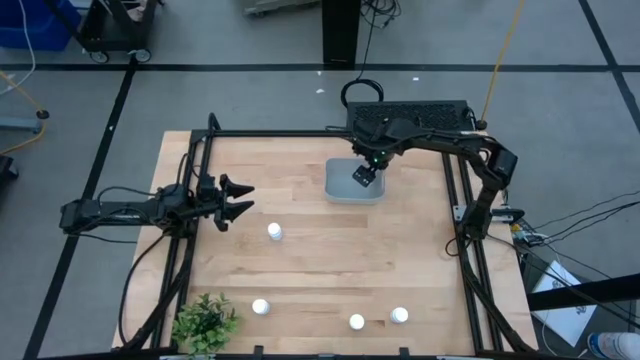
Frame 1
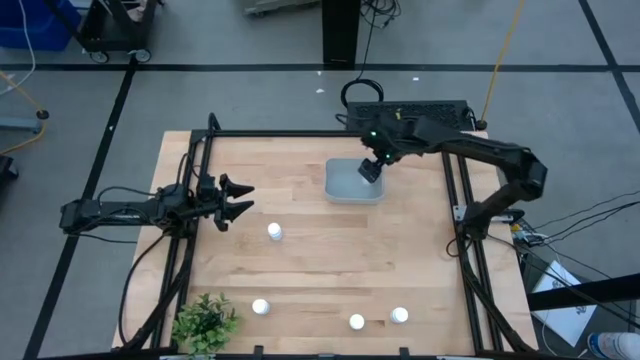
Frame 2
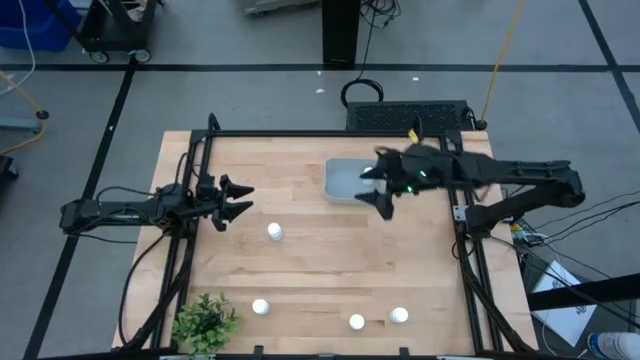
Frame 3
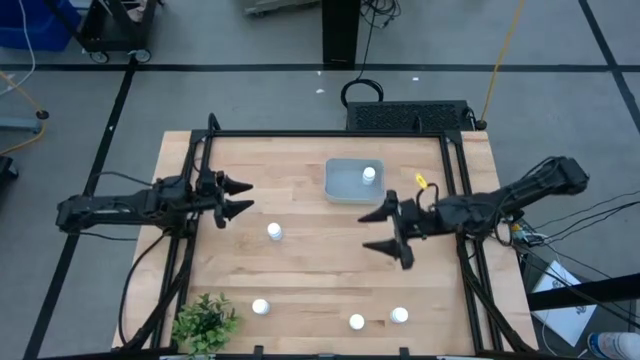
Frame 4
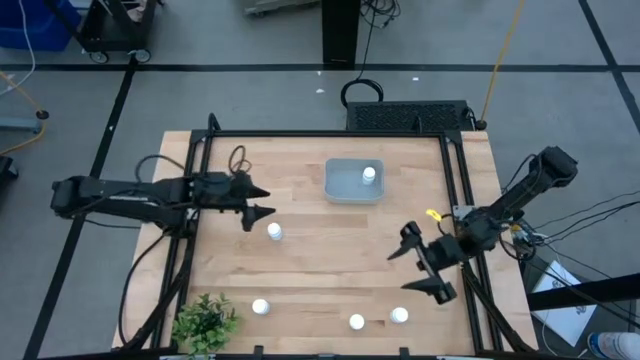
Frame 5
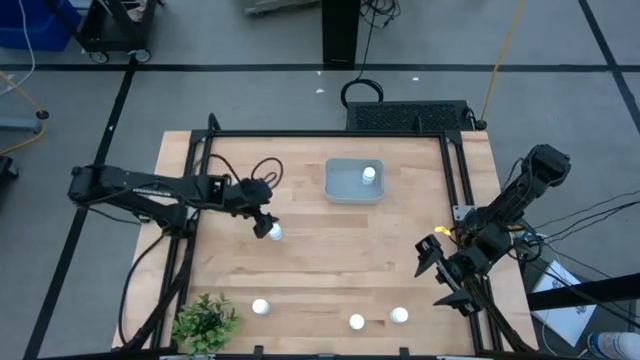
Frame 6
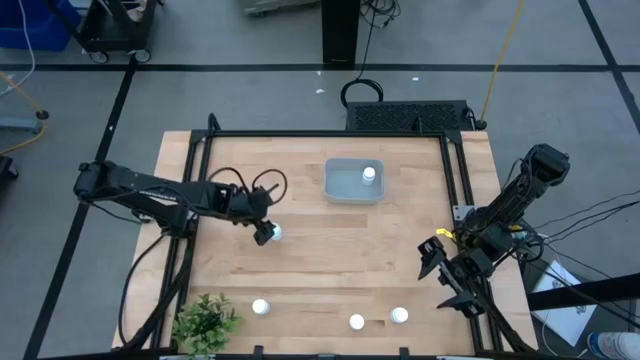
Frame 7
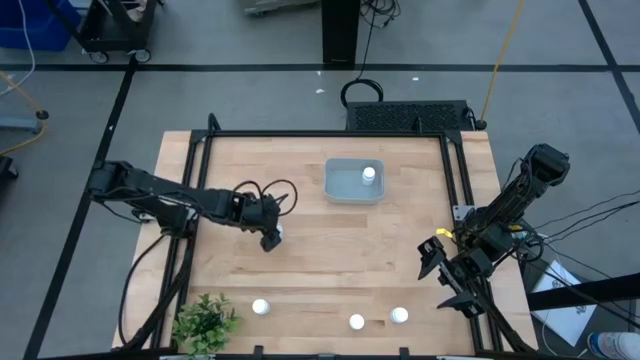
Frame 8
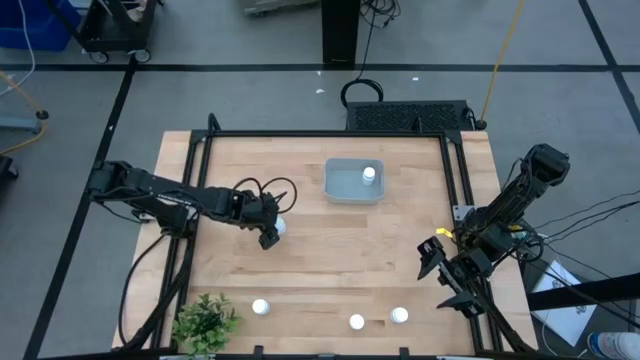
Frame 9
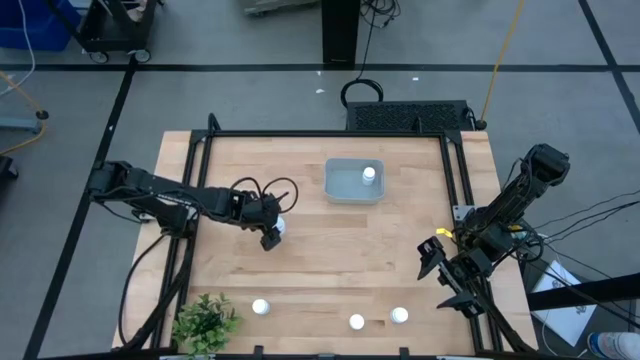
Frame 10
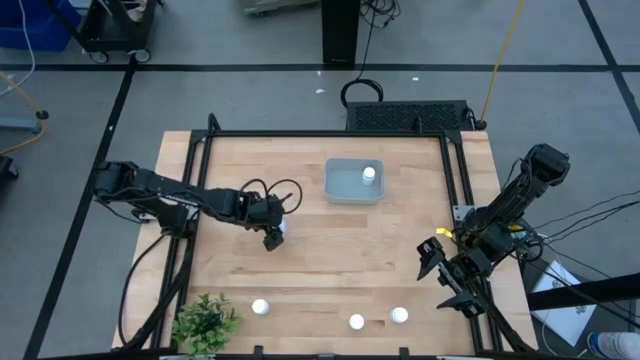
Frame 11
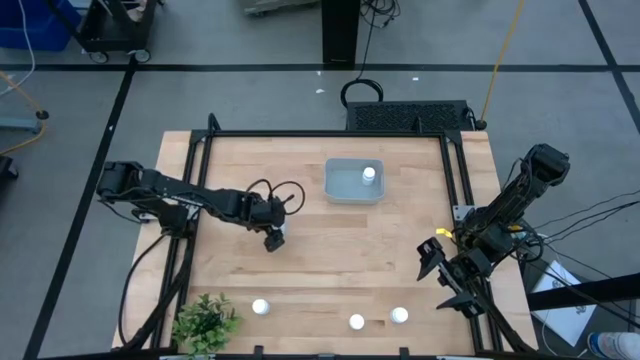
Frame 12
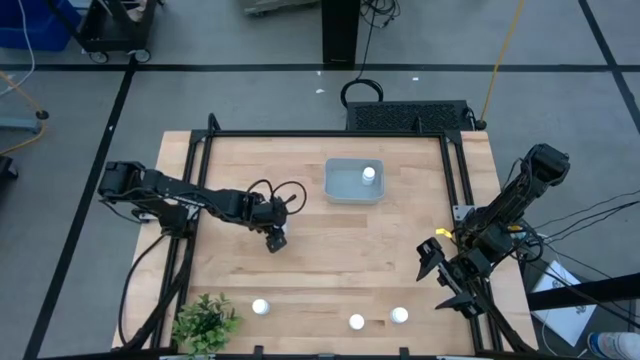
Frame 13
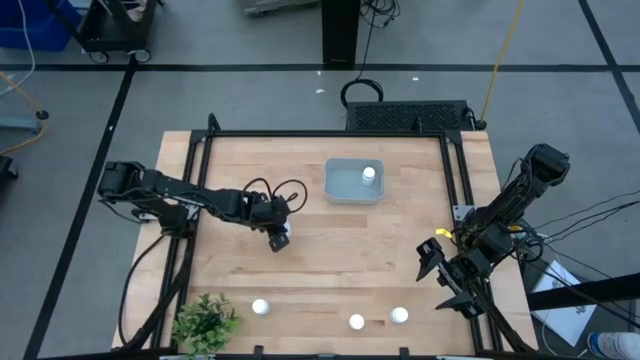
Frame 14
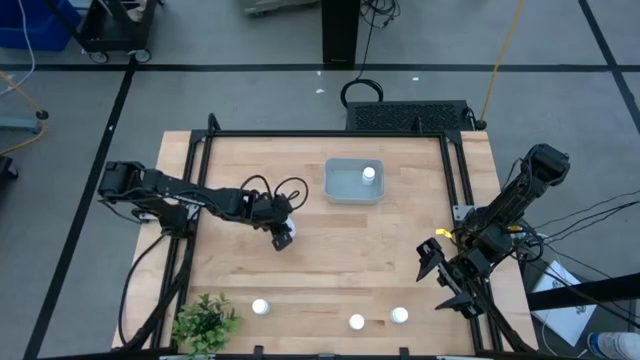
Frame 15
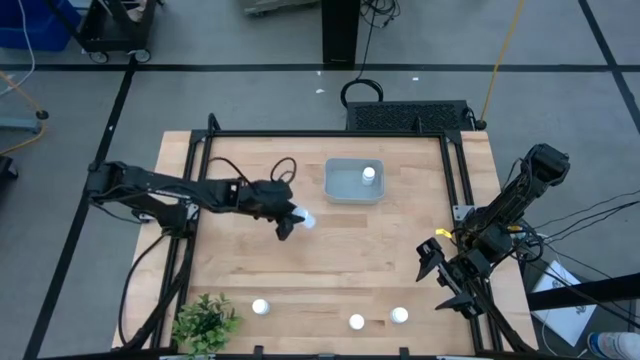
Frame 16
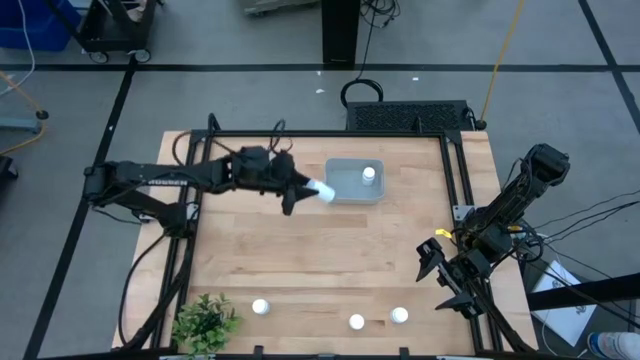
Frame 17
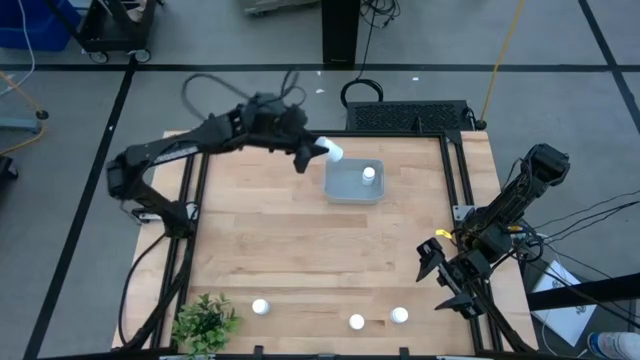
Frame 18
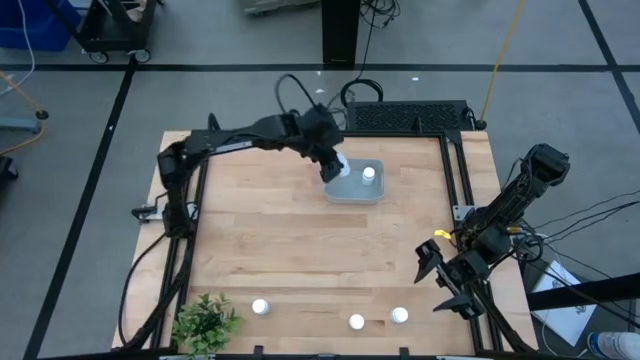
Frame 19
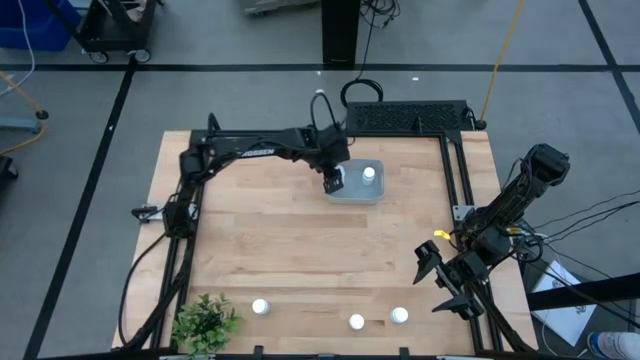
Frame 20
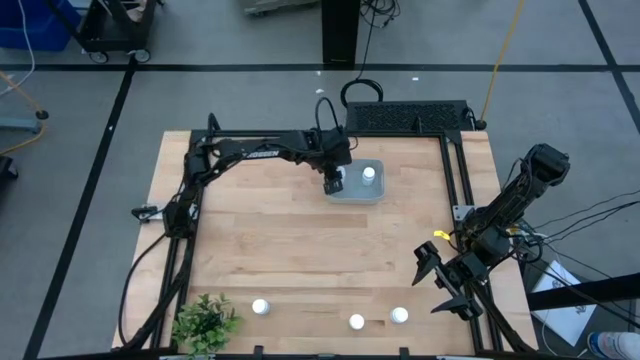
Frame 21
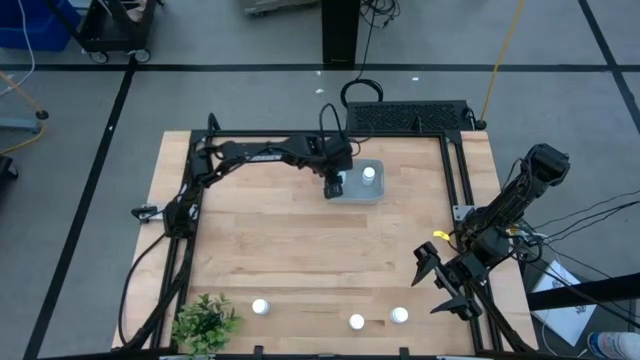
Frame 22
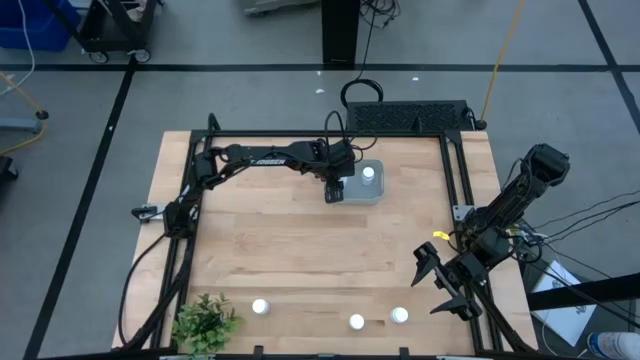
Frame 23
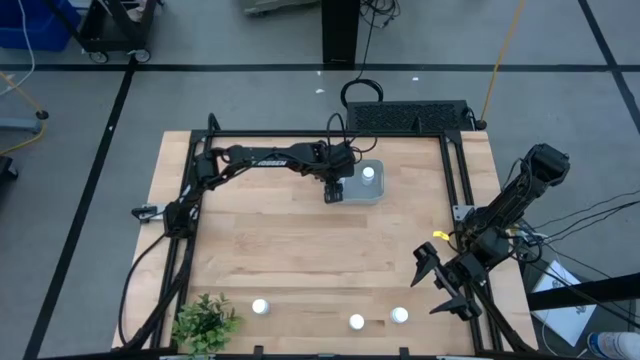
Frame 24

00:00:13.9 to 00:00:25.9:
Task: Pick and place pill bottles into a basket
Put the white medicine bottle into the gray bin

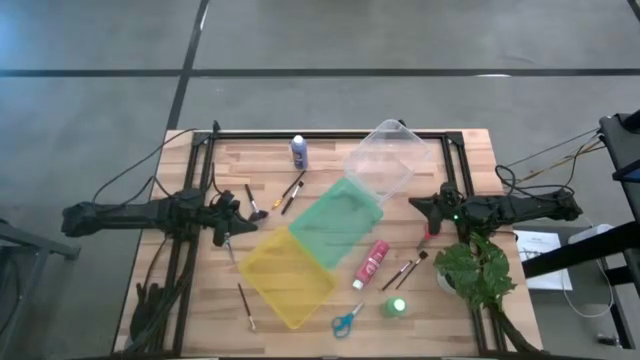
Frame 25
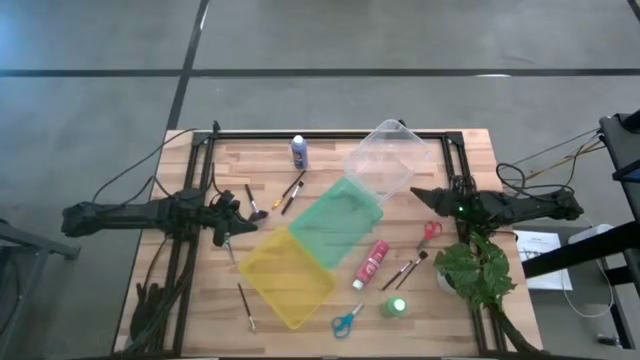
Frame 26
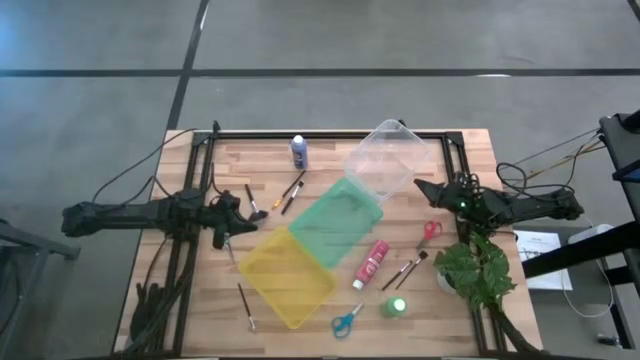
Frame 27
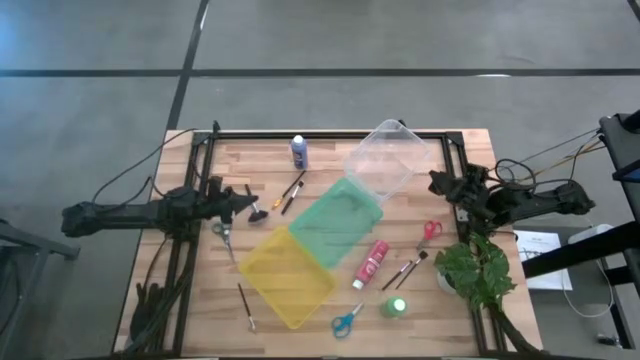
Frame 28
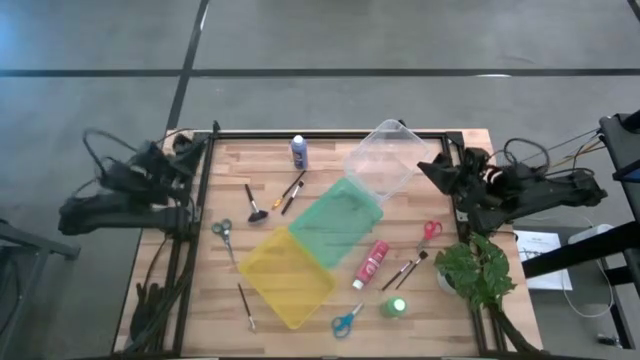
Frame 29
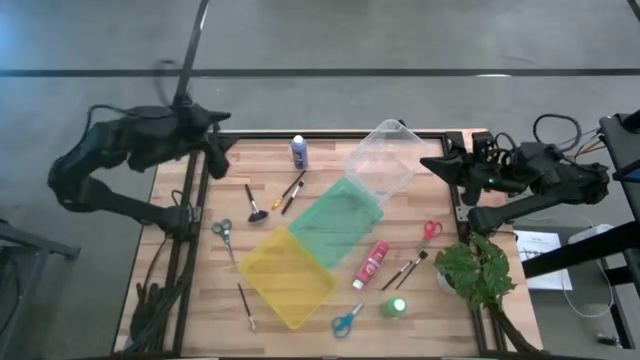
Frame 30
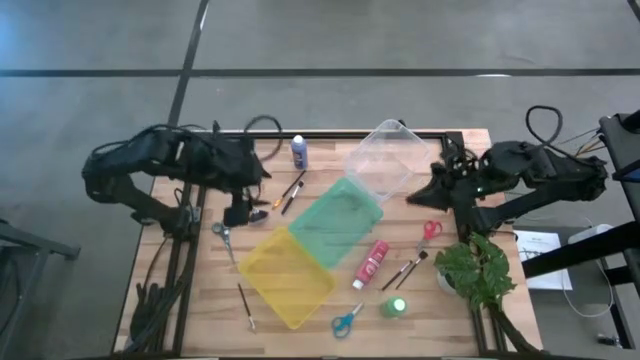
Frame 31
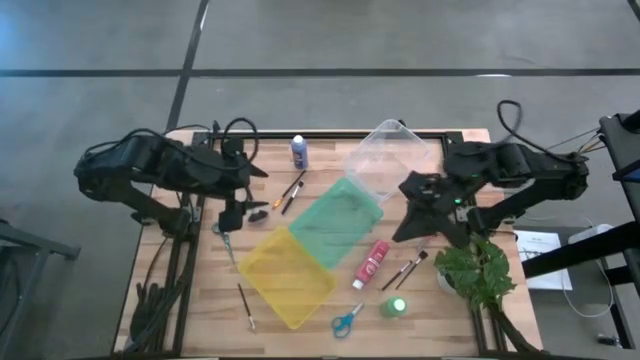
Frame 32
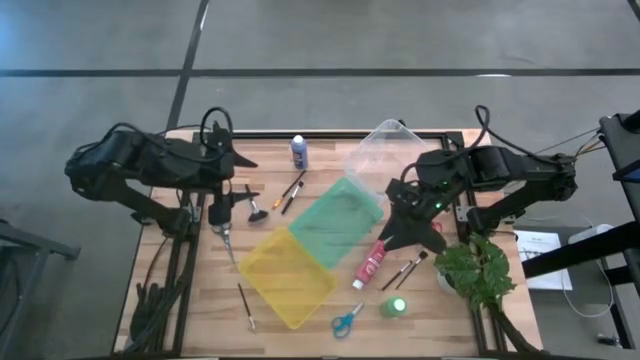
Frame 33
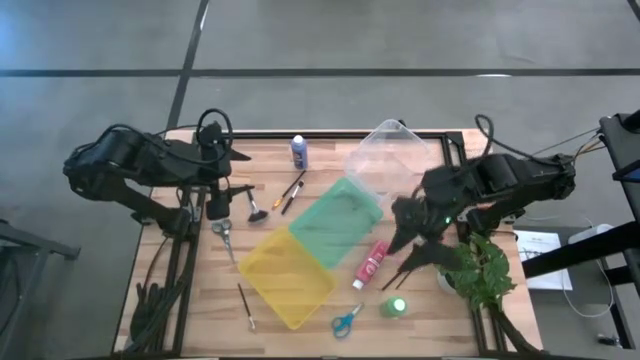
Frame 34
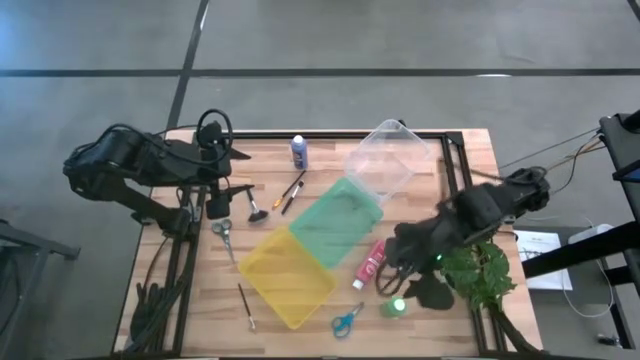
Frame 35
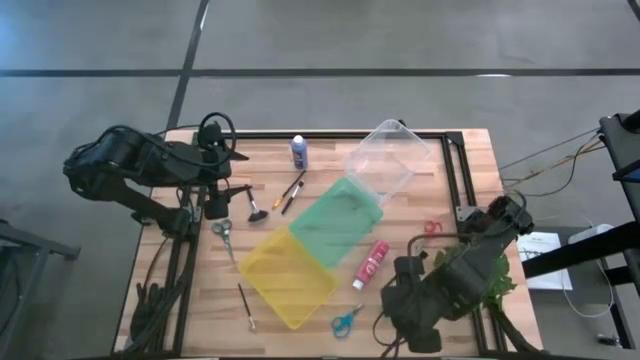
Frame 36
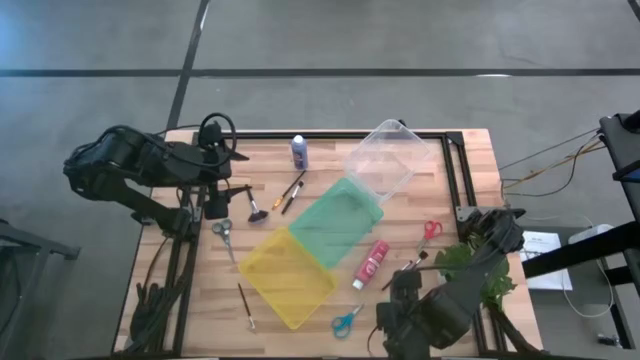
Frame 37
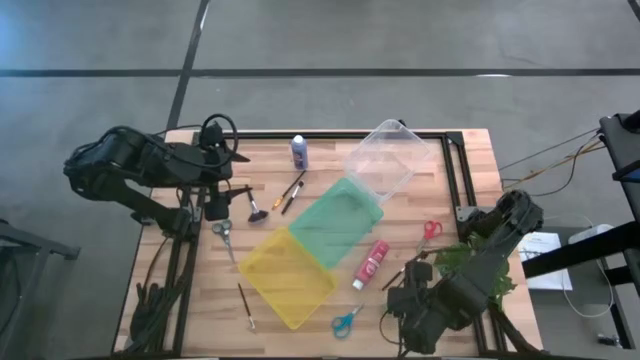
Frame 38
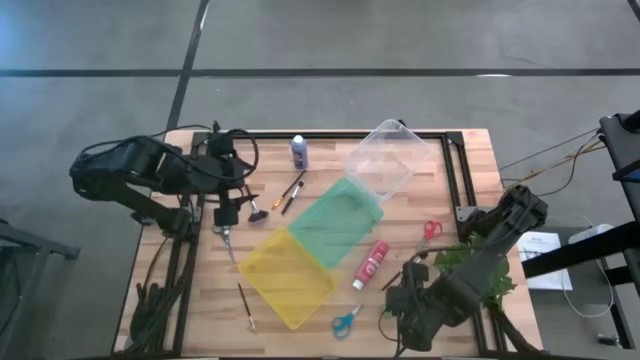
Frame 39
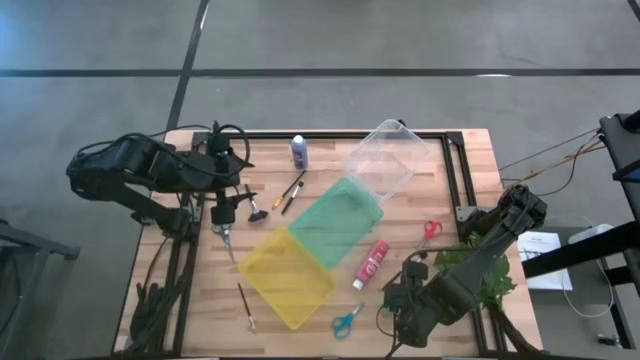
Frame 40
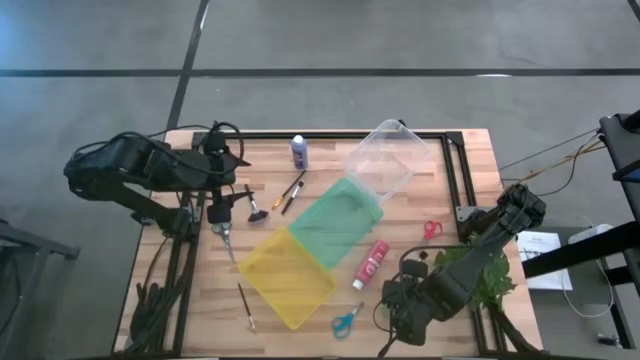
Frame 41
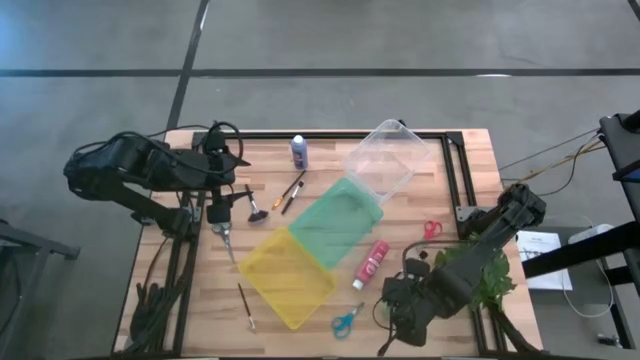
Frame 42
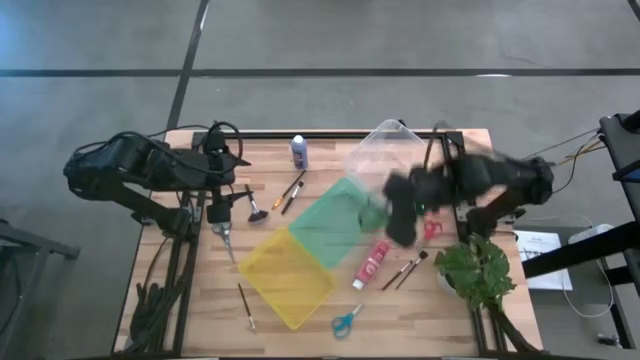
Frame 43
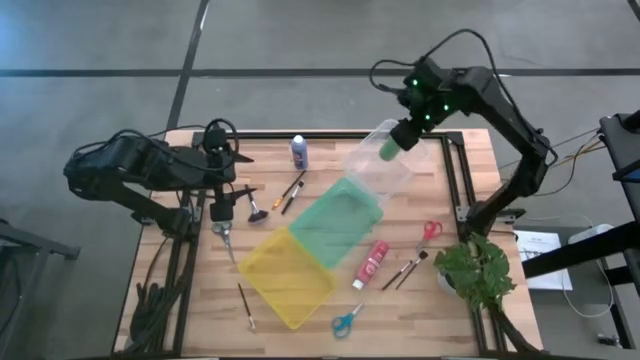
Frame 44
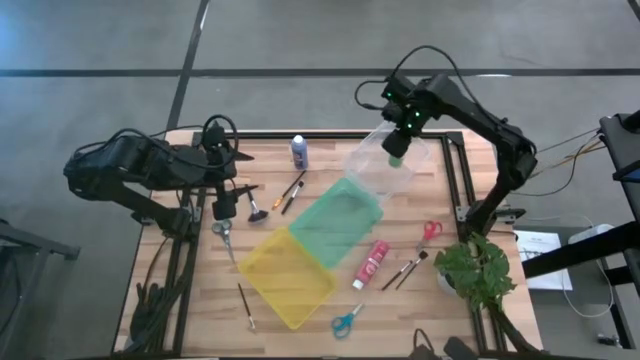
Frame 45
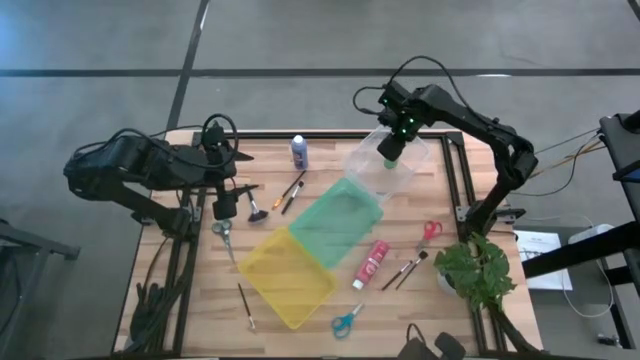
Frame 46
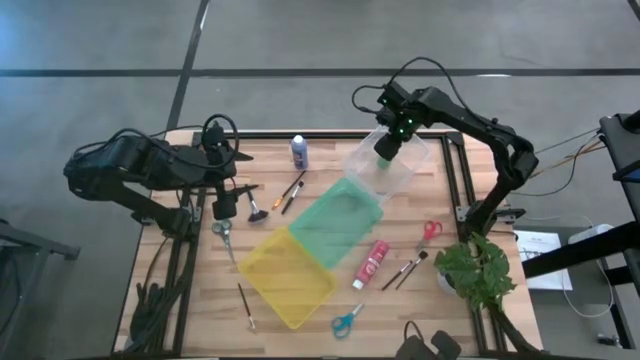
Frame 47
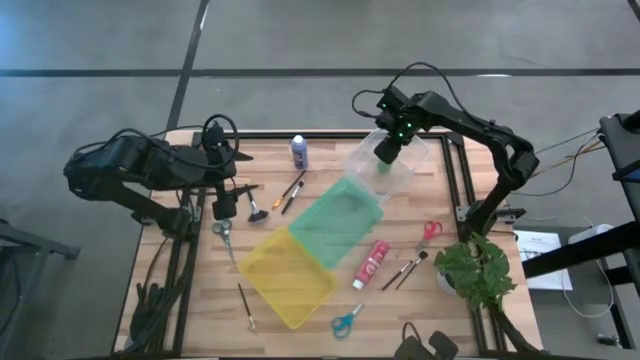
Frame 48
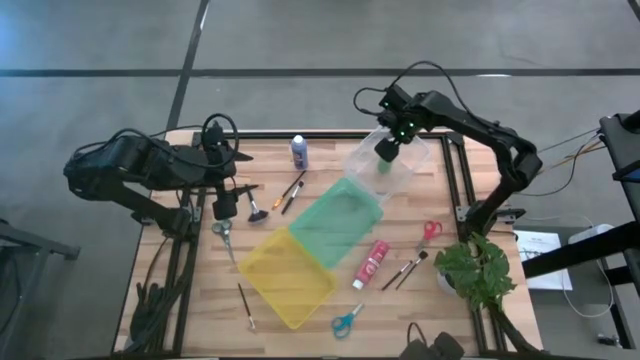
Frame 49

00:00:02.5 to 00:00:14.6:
Task: Pick & Place Paint Supplies
Put the green paint bottle into the transparent bin
